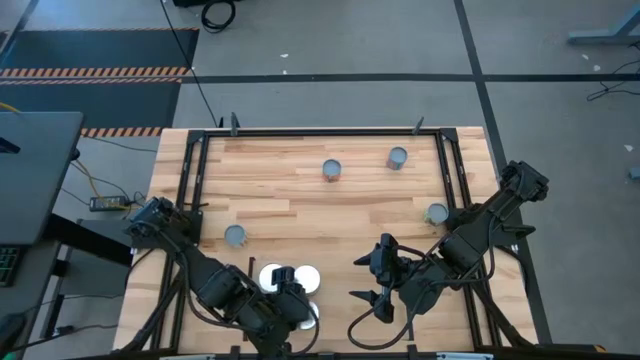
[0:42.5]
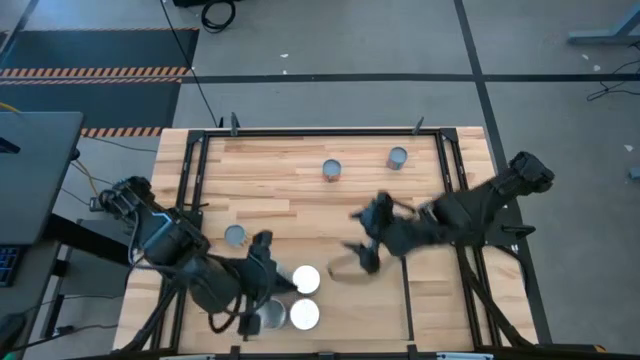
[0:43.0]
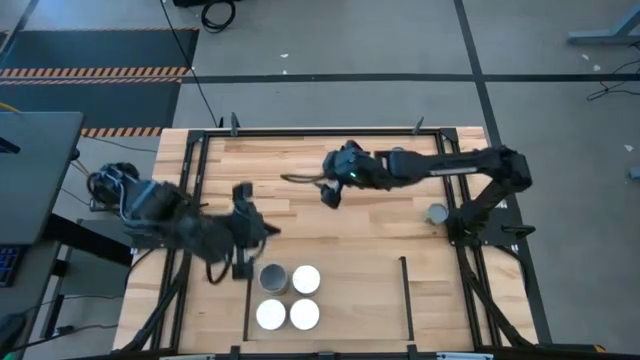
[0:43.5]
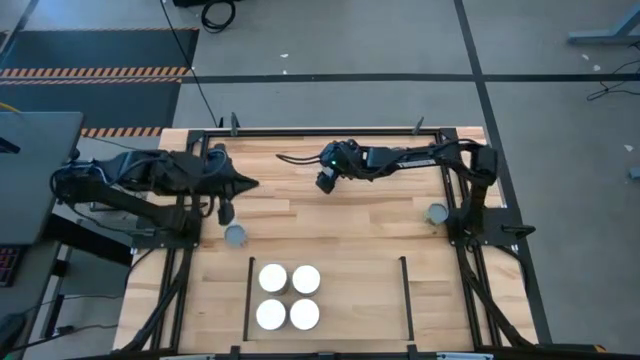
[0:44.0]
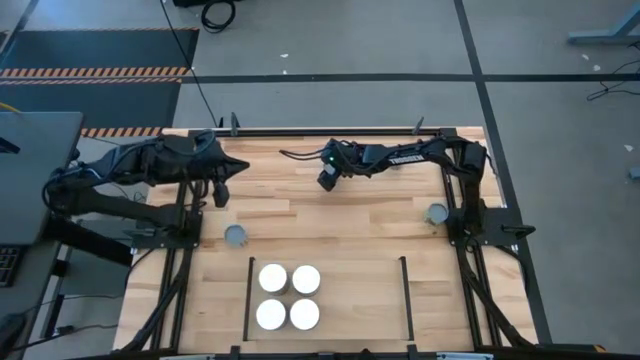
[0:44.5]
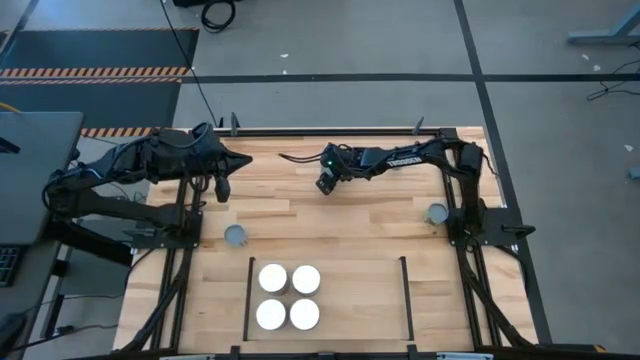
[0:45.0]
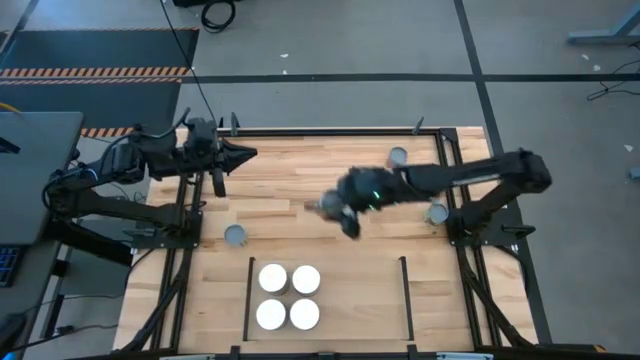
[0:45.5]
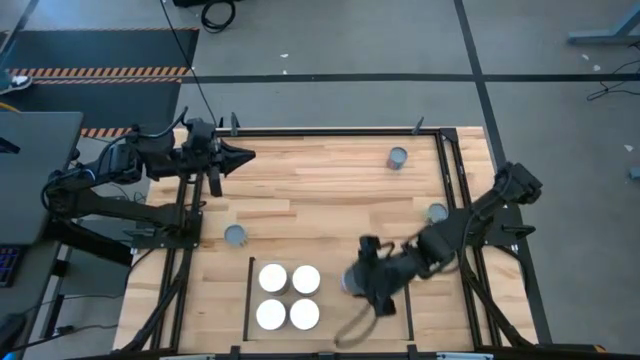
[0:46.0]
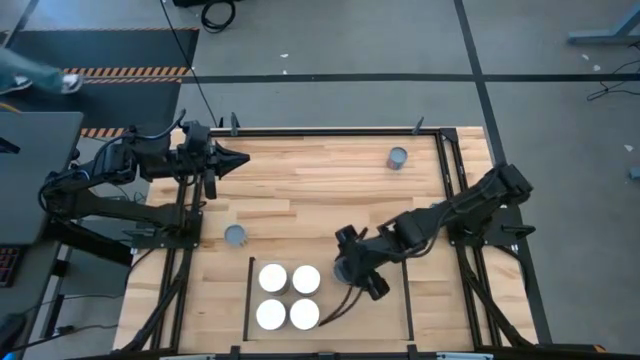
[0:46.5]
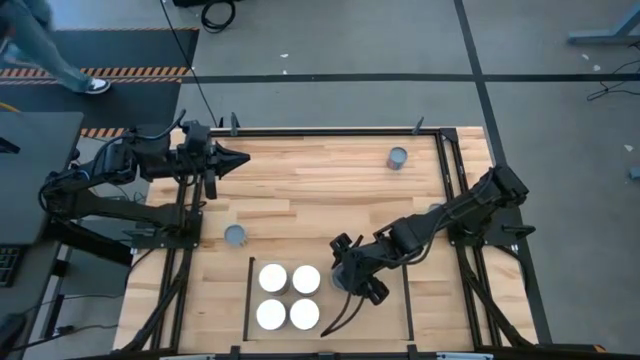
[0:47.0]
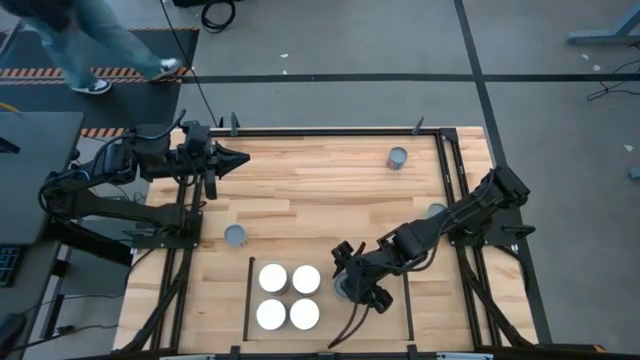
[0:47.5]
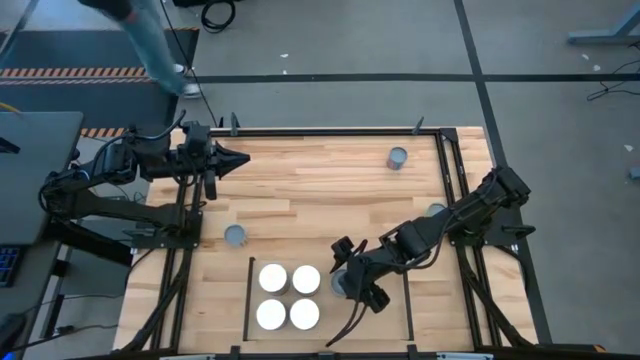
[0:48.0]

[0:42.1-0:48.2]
Task: Pick and place cans onto a shelf
Put the canned oranges on the shelf

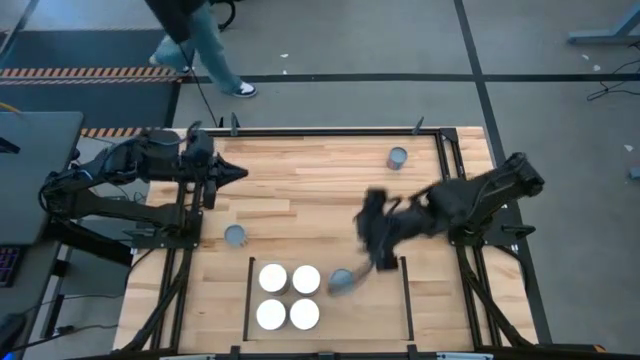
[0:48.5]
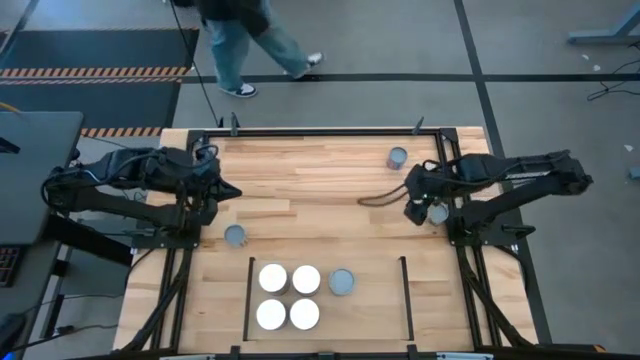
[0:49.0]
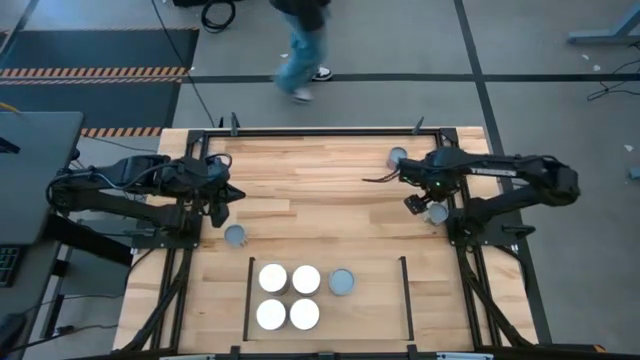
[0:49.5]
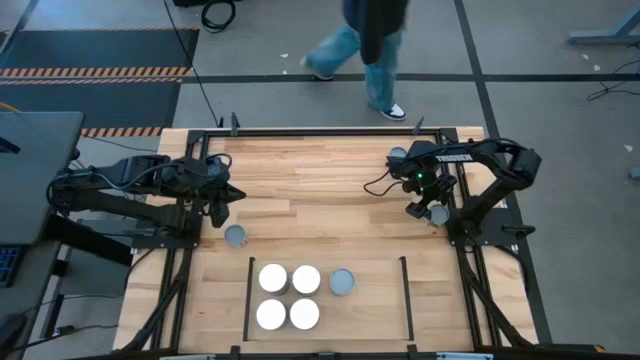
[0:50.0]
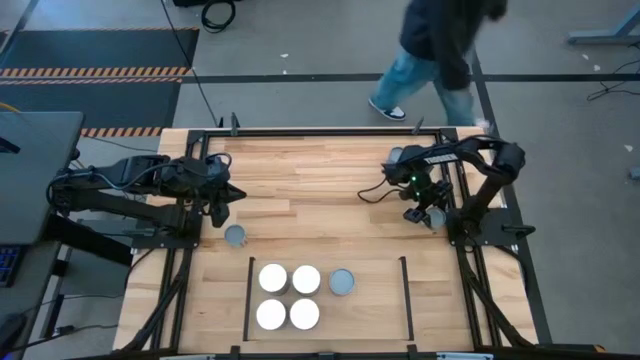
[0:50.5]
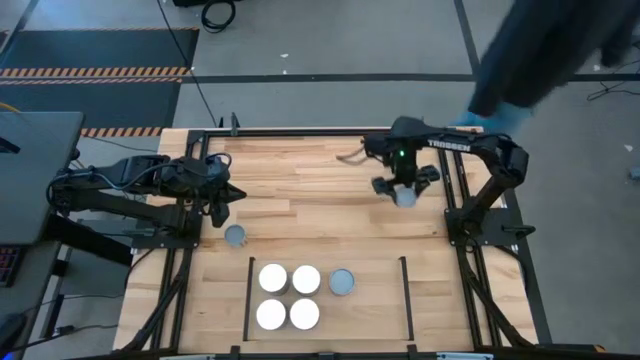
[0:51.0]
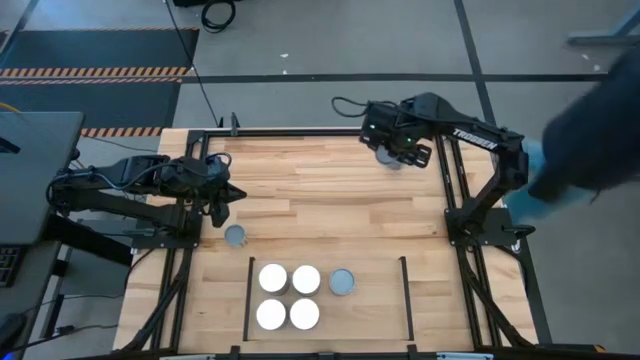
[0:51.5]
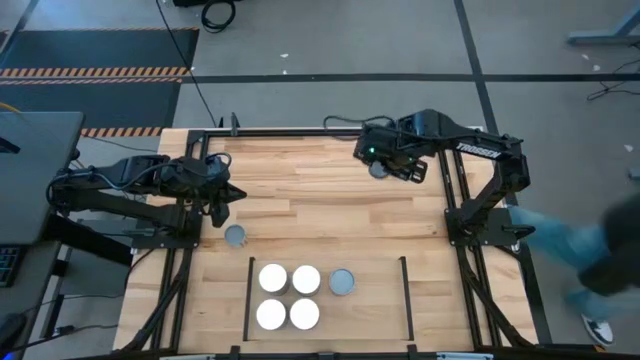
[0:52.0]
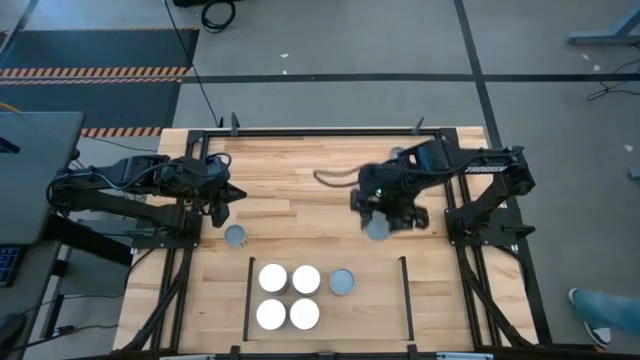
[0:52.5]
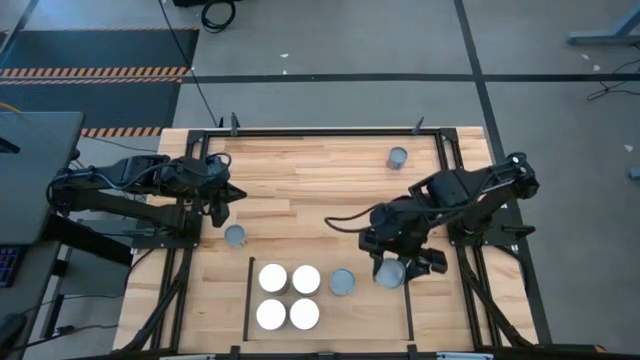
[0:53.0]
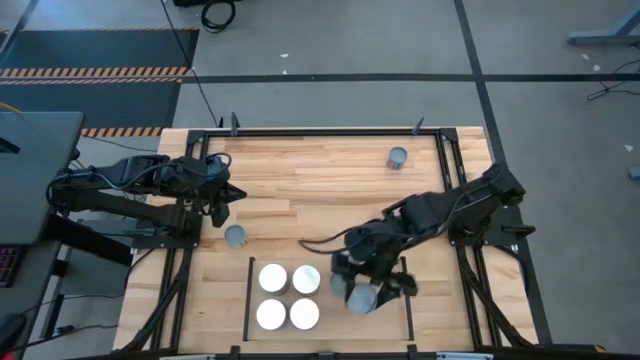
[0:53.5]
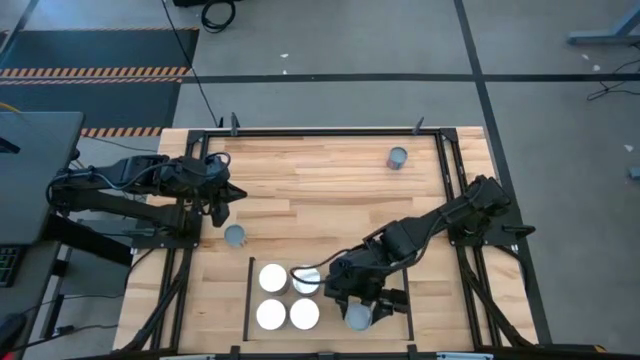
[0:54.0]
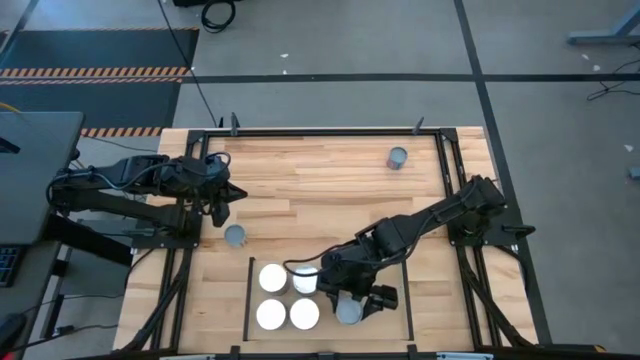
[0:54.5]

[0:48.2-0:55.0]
Put the canned peas on the shelf

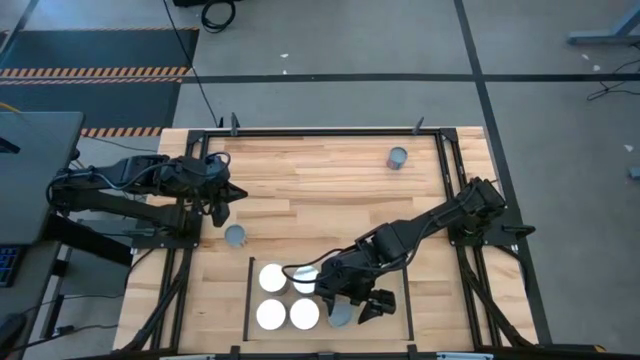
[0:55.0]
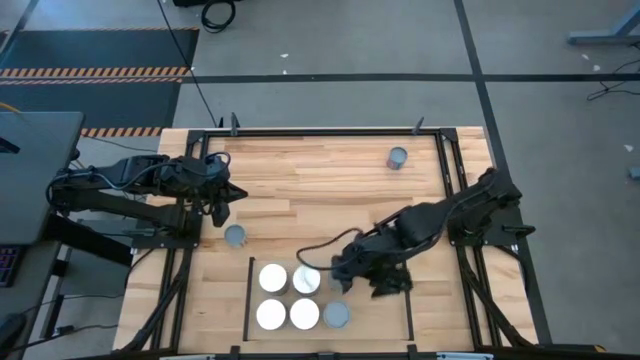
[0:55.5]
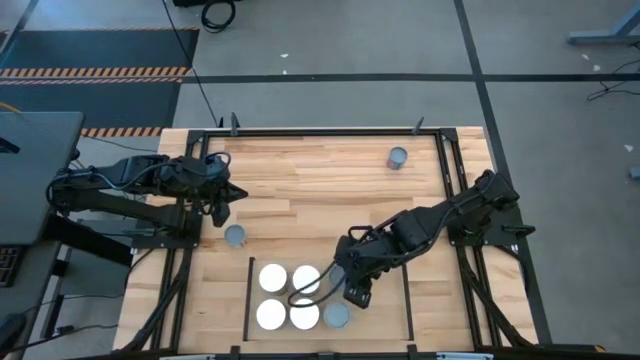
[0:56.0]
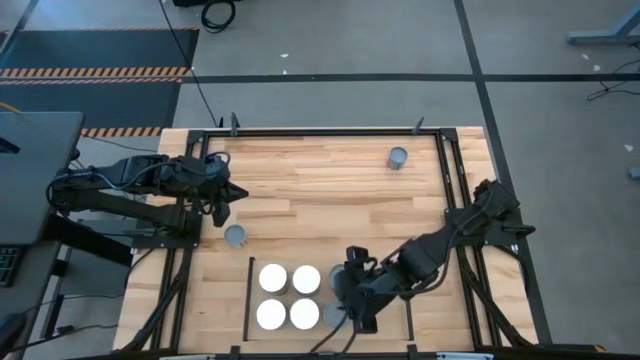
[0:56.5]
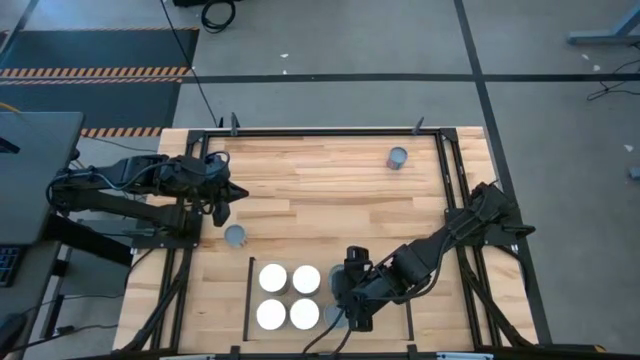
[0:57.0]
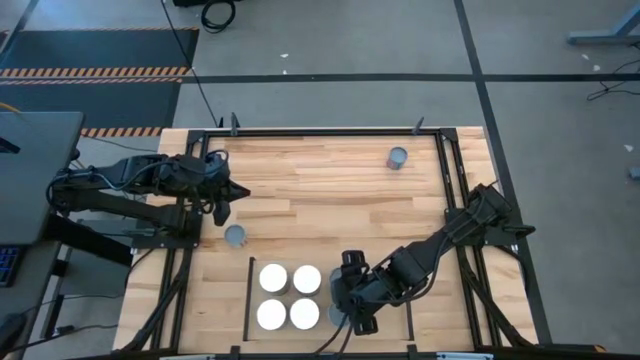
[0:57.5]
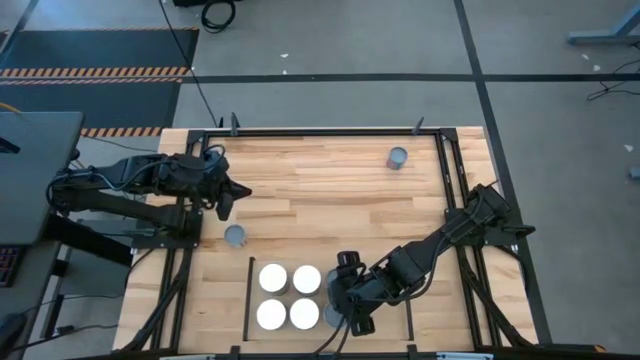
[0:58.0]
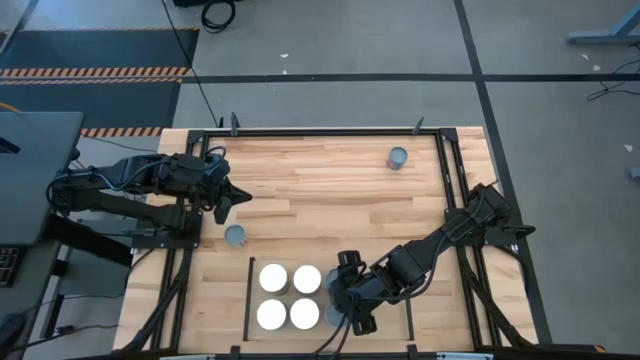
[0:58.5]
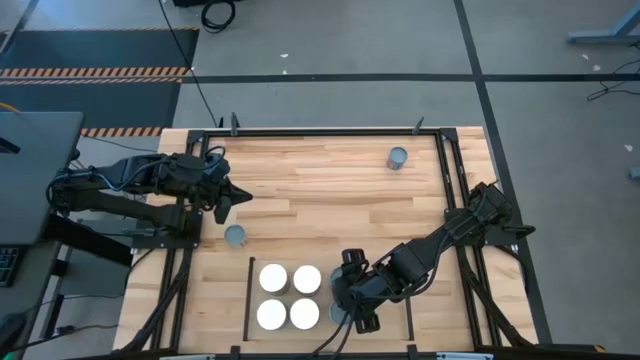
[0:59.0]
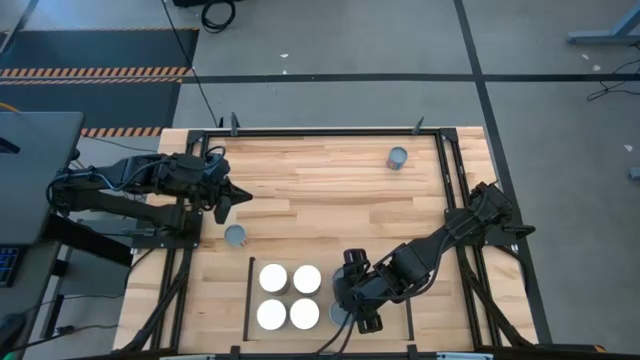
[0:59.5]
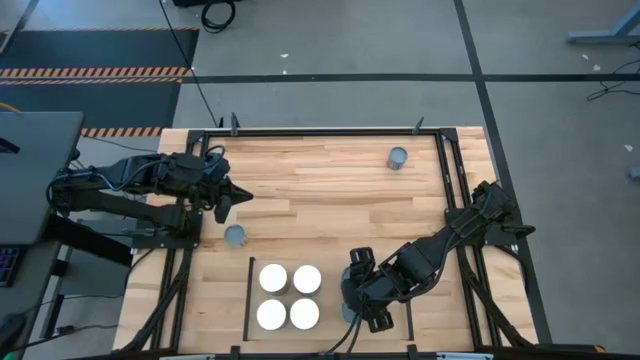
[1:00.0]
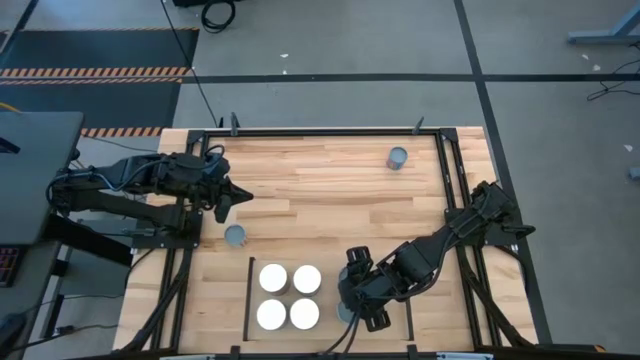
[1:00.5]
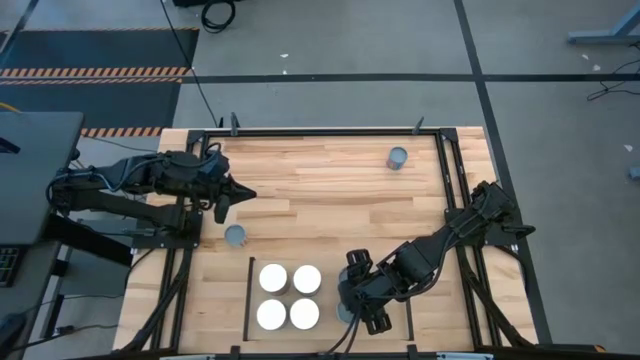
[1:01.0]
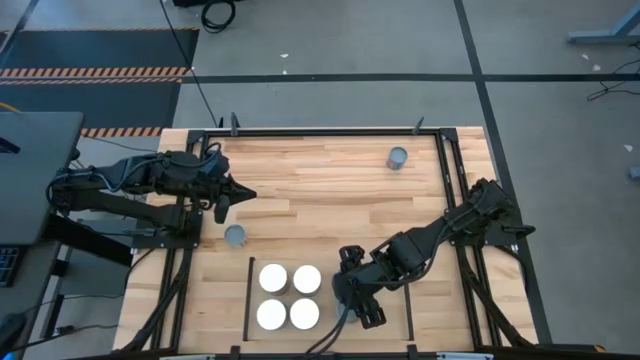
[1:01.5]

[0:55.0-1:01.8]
Adjust the cans on the shelf

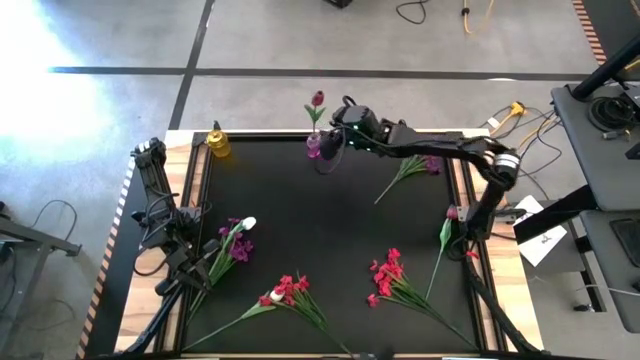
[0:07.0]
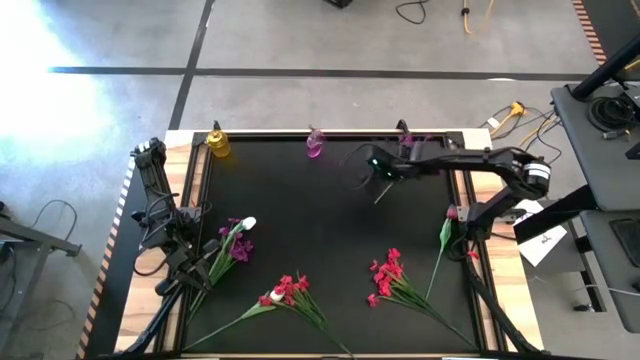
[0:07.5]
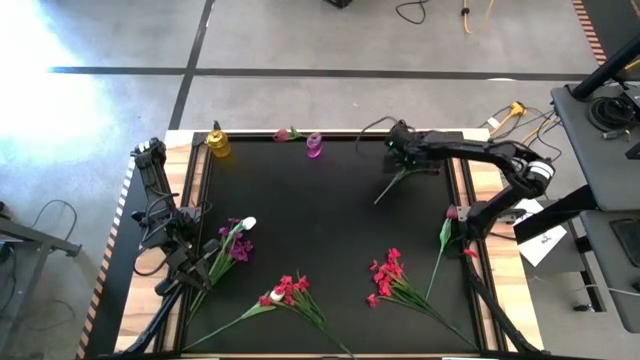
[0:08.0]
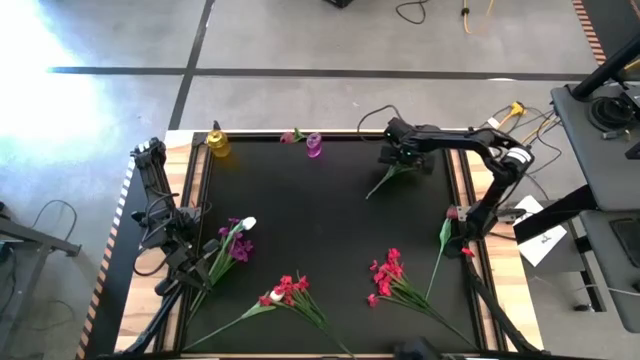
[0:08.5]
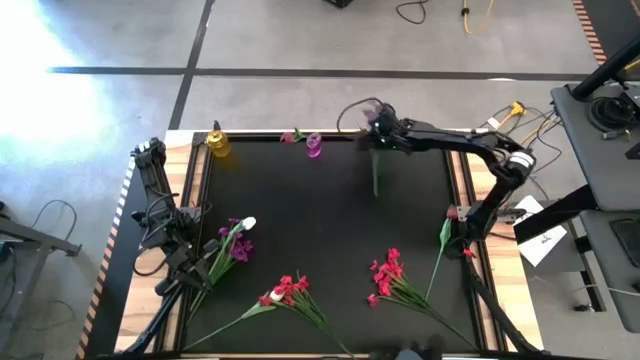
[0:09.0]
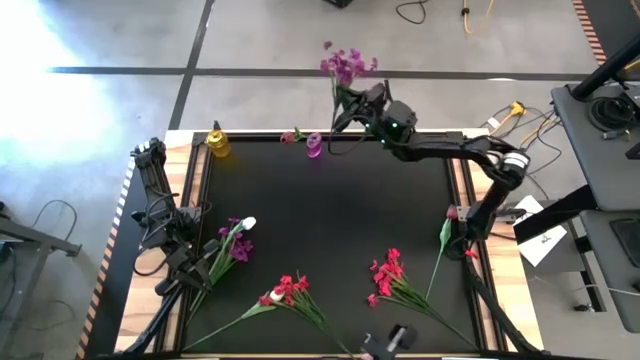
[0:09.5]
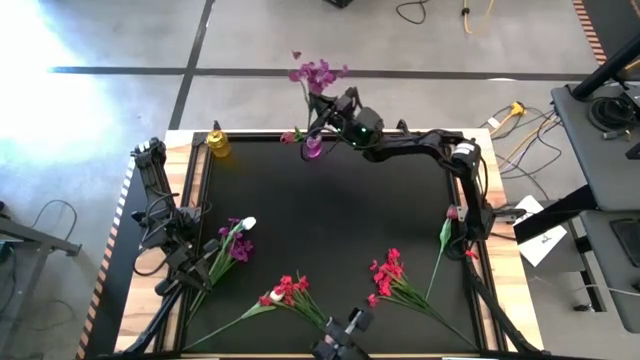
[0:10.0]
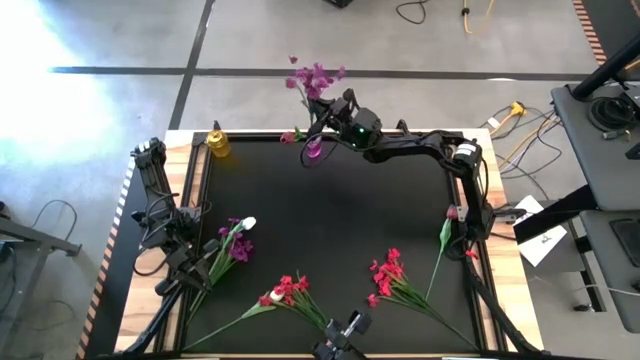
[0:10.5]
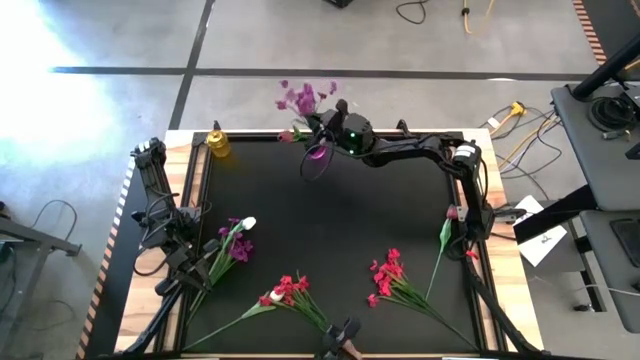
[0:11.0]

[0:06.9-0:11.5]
Task: Sort flowers into vase by color
Put the right purple flowers into the purple vase
